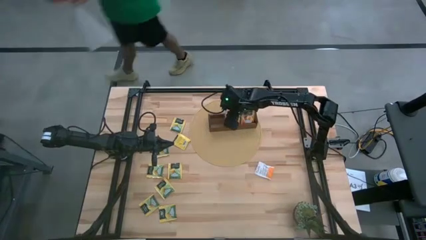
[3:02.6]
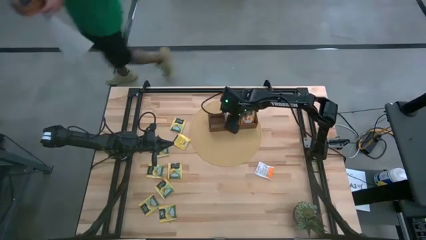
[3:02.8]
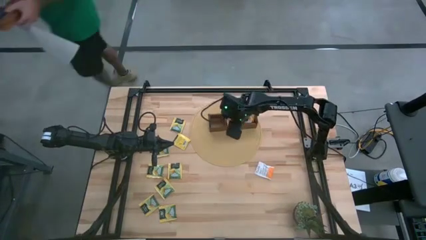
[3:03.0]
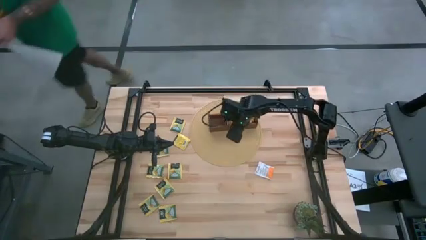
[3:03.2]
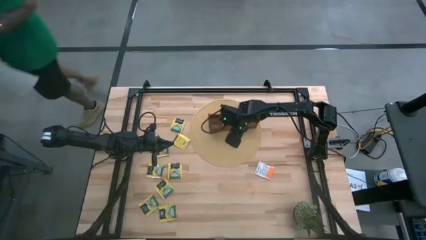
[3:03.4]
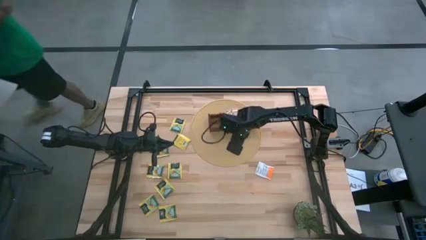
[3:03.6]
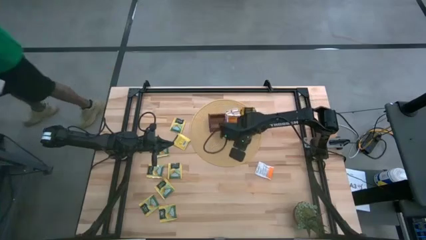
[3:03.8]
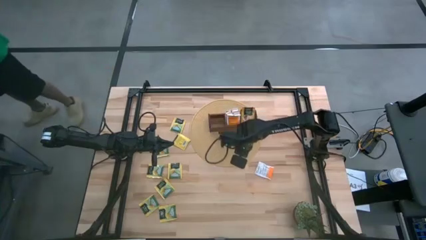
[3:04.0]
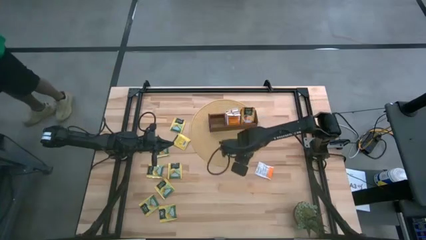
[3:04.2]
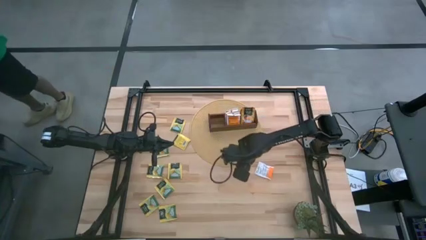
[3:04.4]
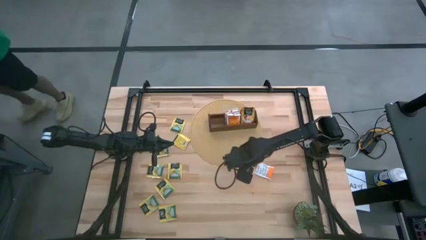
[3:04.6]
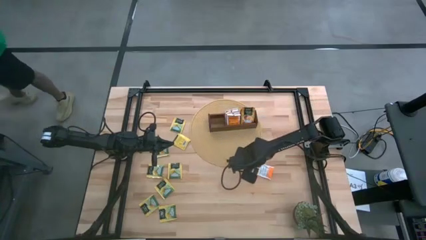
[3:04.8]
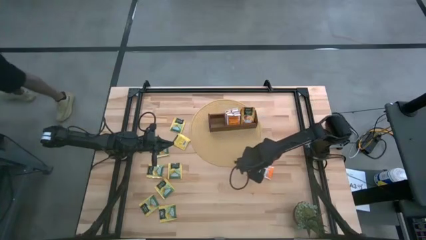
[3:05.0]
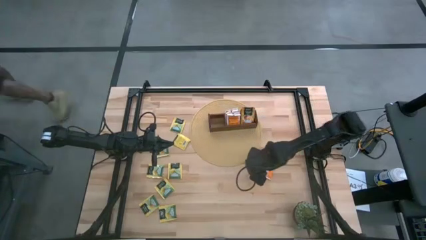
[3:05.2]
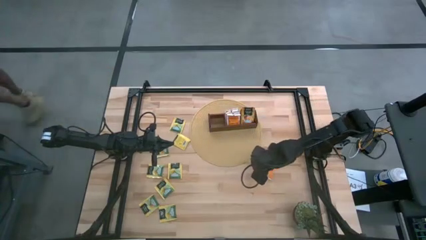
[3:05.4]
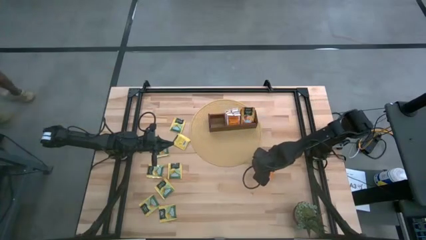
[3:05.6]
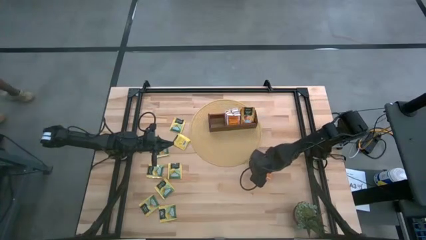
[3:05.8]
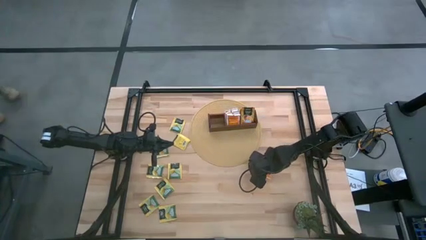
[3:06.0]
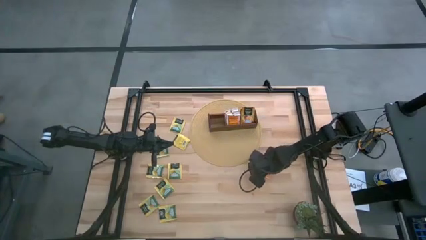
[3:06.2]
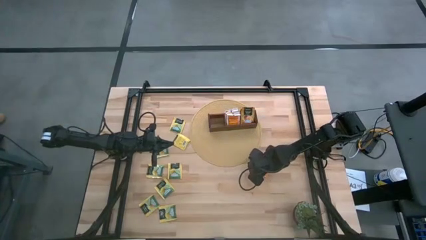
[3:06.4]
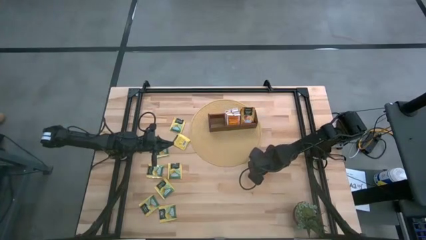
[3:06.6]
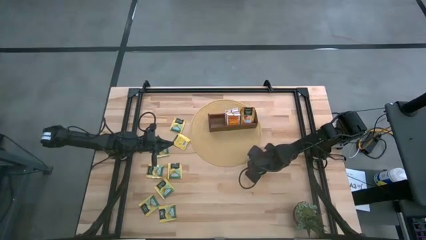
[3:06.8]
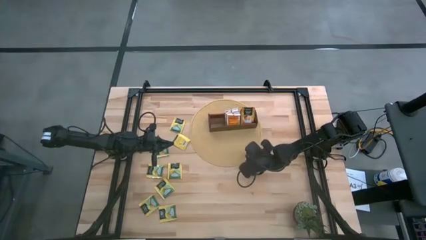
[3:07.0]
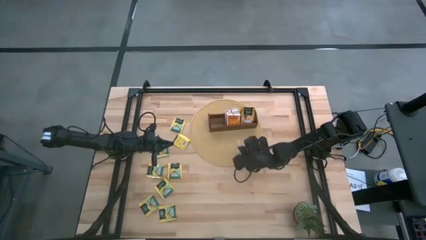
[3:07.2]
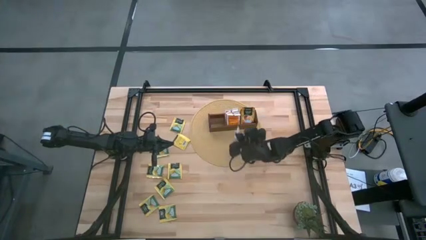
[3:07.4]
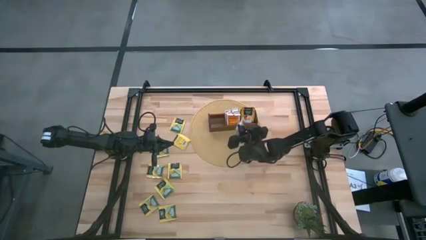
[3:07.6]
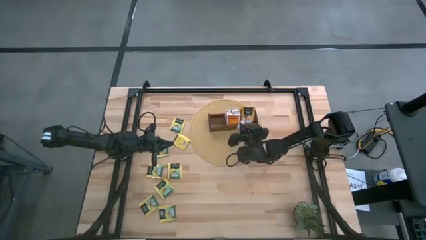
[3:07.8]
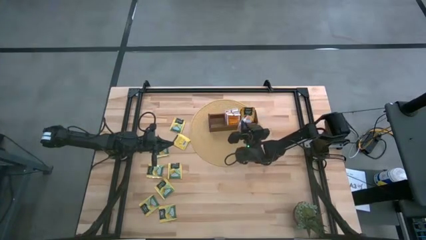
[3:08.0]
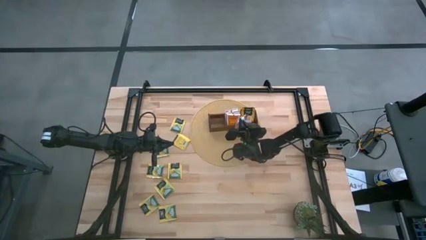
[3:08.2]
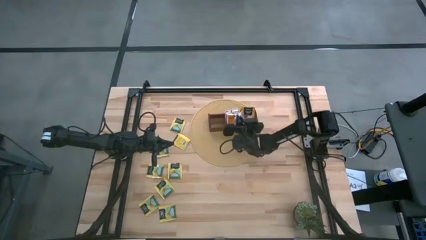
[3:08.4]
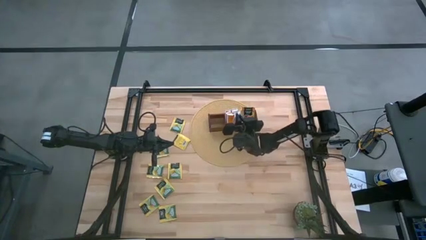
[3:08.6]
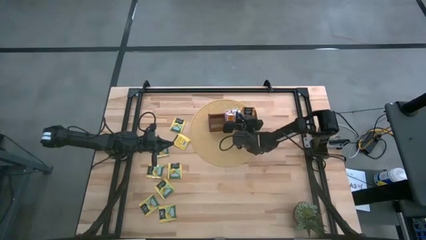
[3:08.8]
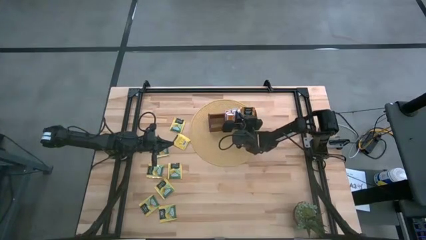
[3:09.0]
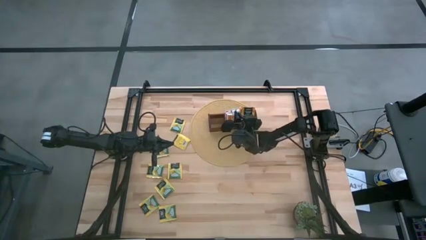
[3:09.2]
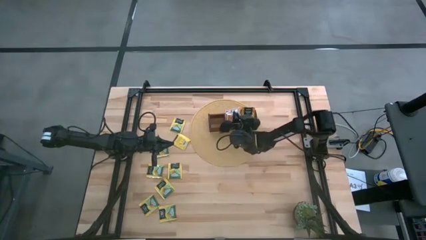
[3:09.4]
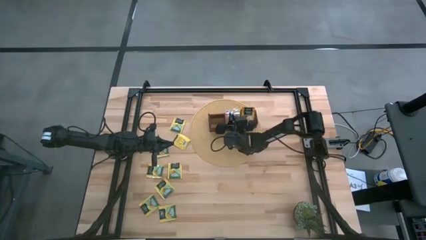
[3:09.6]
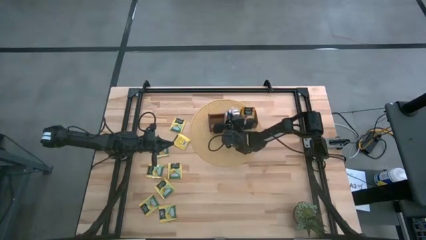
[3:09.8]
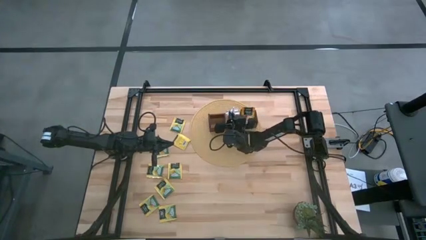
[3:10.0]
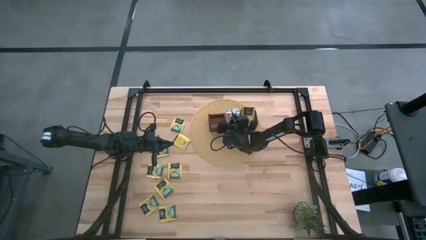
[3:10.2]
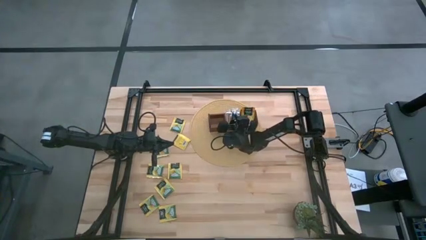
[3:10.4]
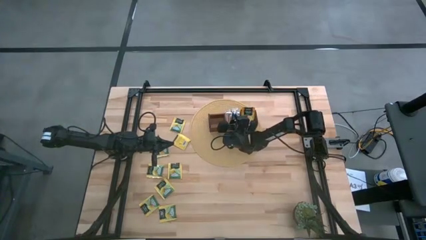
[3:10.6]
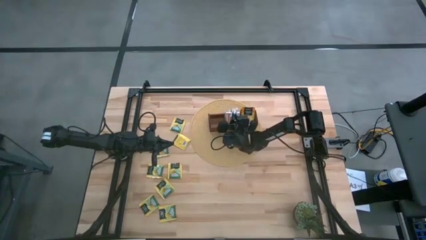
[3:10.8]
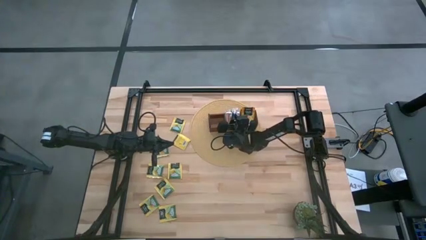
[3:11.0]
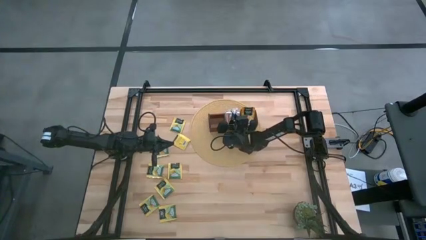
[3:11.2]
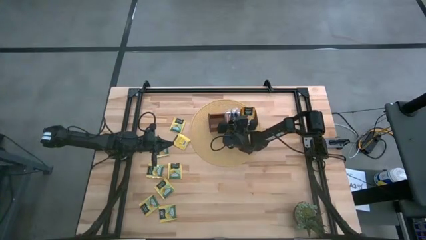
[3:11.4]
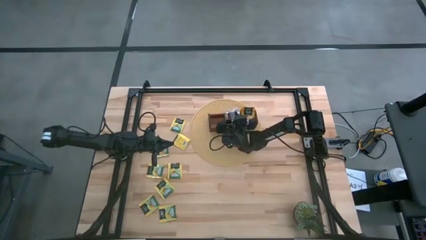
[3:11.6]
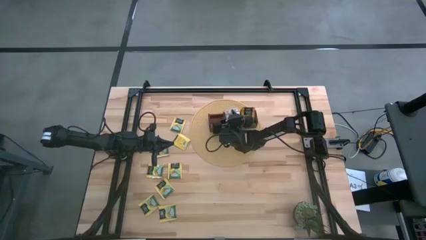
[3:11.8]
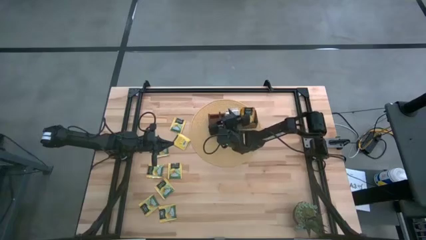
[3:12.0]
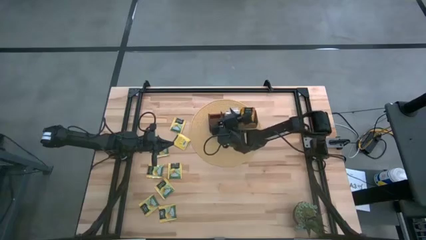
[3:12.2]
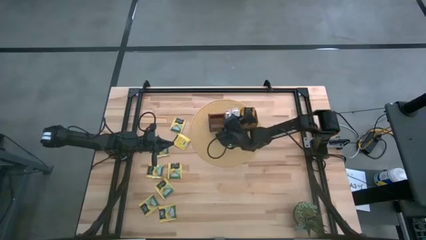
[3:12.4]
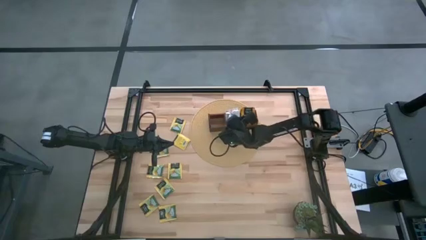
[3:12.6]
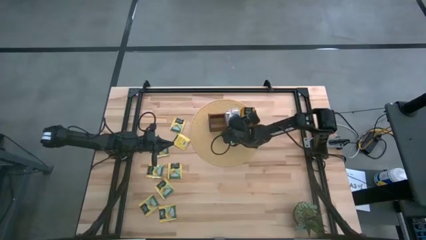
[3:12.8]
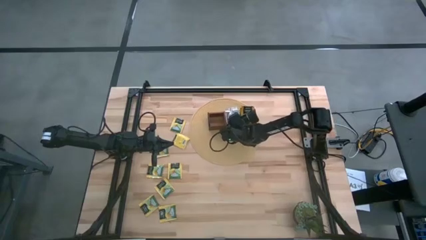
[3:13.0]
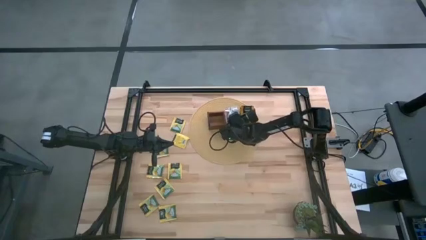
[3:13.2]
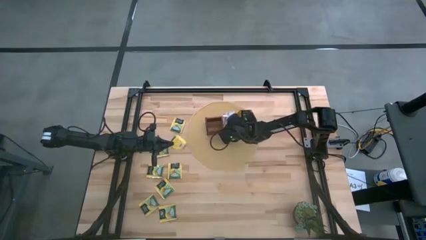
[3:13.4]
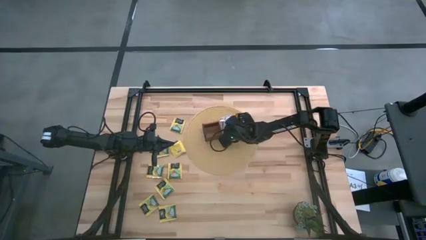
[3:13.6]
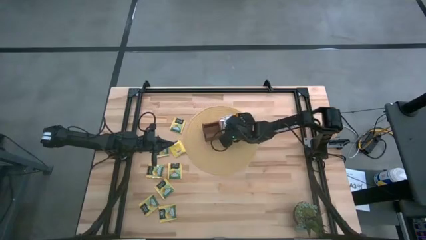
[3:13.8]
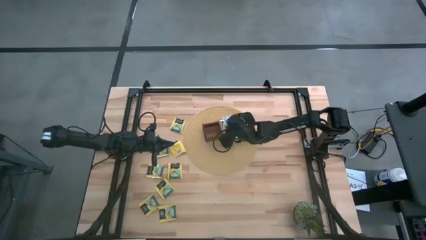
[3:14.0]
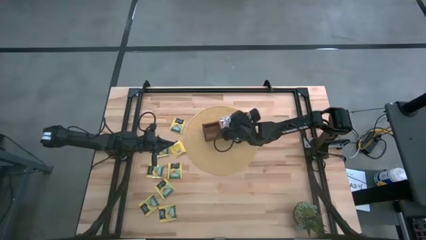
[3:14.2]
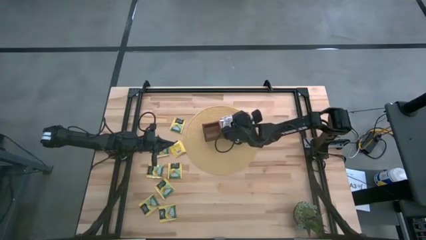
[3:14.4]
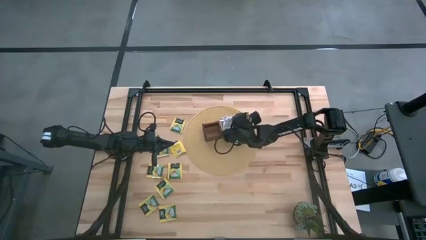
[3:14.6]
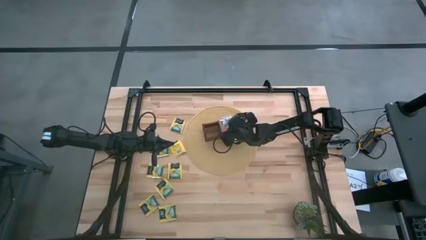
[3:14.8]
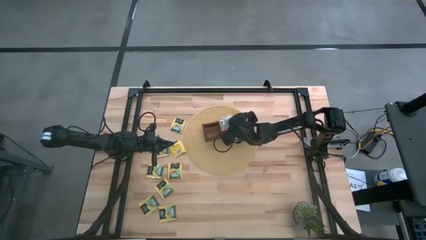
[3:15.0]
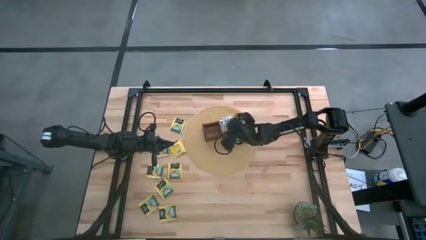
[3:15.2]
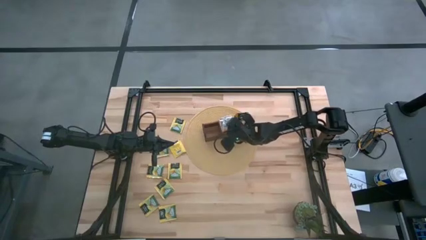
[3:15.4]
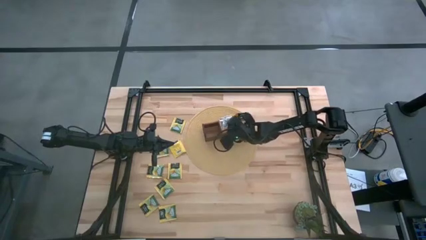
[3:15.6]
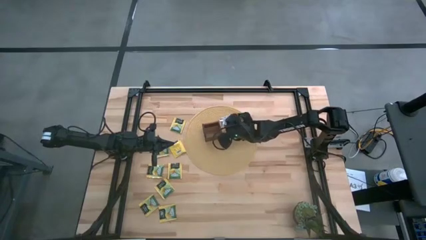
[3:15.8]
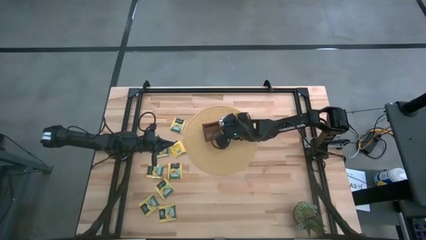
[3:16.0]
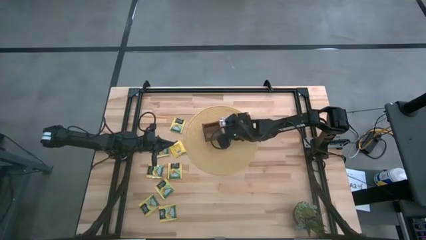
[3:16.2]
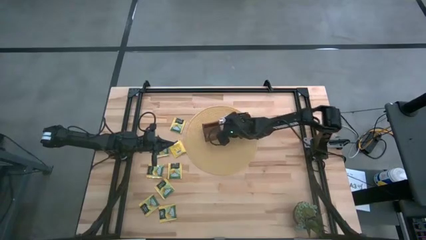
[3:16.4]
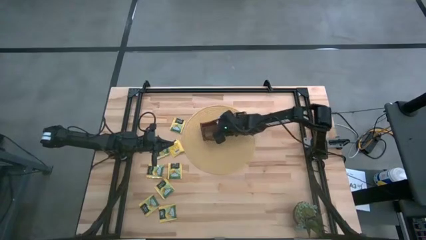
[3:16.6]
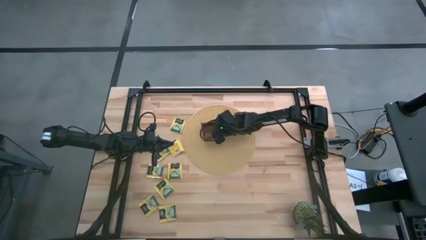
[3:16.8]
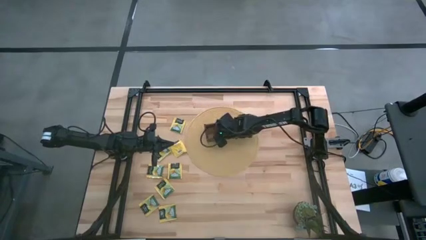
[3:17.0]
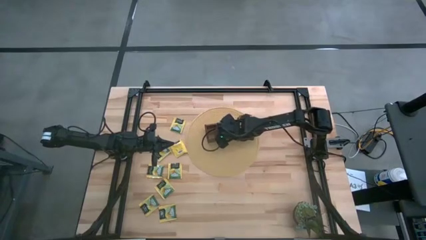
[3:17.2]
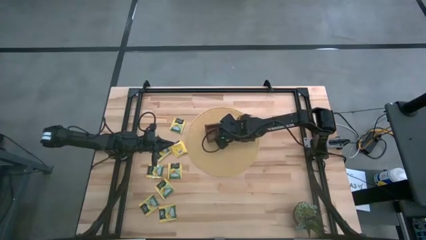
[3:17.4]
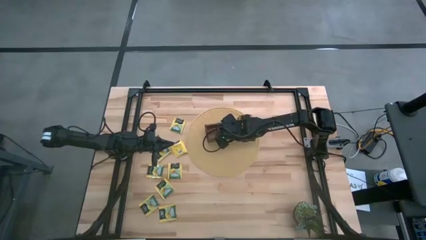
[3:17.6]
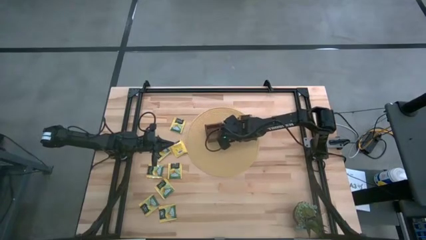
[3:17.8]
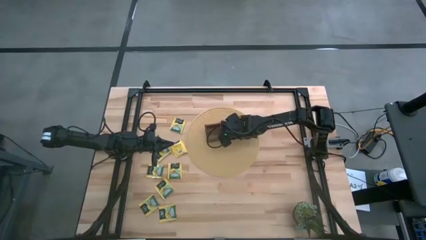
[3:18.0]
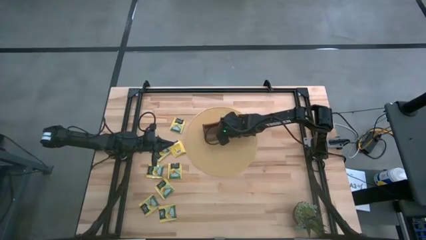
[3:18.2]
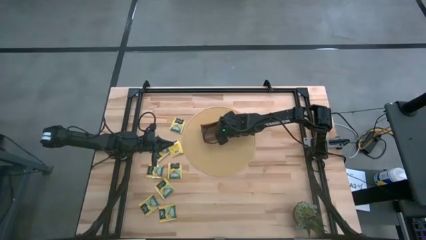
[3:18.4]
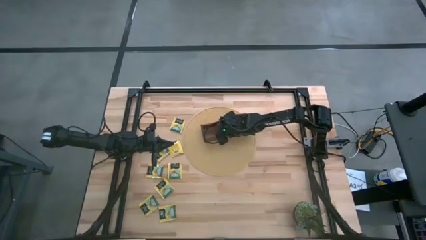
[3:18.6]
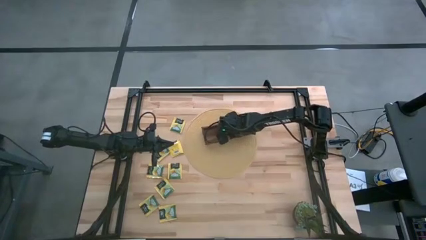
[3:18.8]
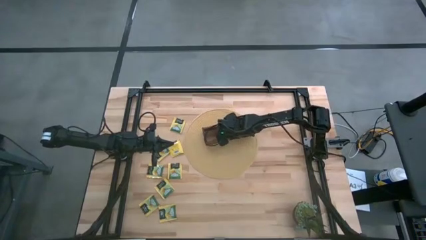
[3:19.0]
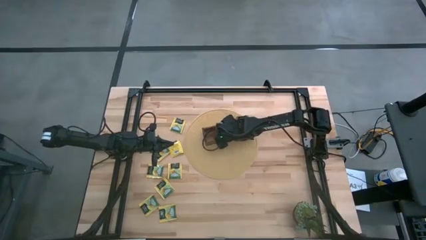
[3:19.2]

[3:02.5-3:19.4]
Task: Pick & Place Tea
Put the white tea bag into the middle section of the wooden organizer
